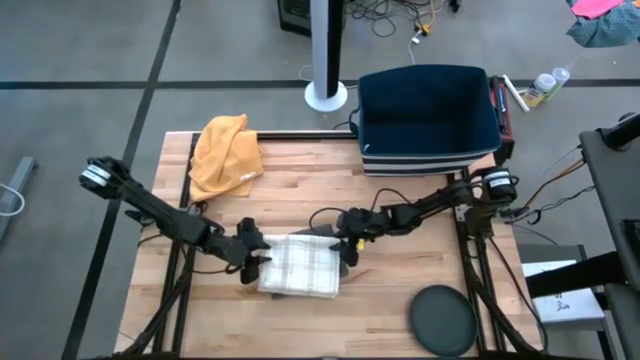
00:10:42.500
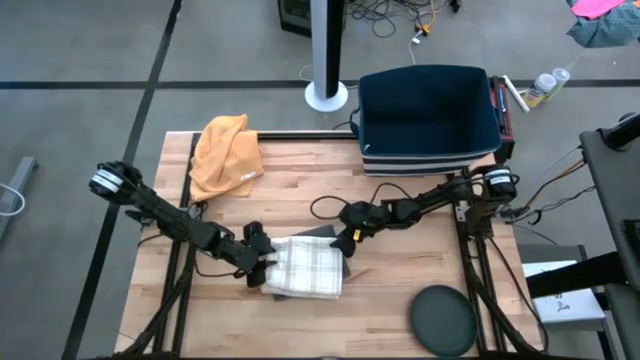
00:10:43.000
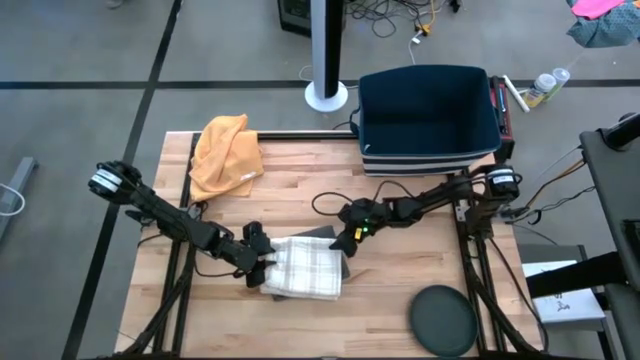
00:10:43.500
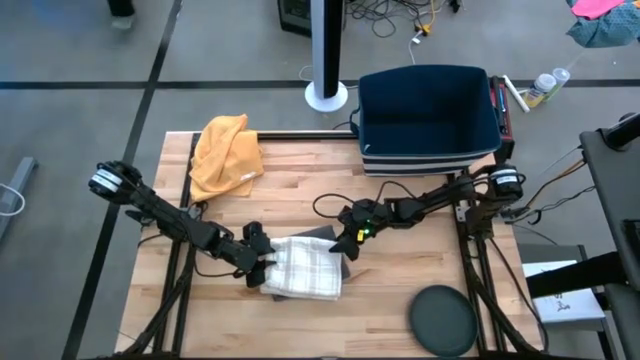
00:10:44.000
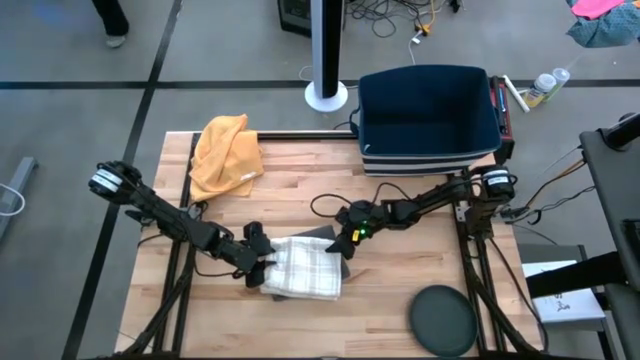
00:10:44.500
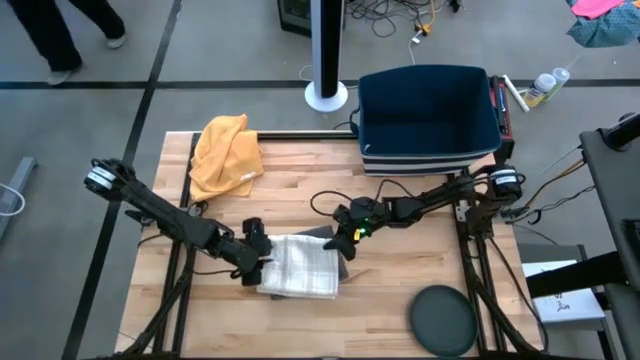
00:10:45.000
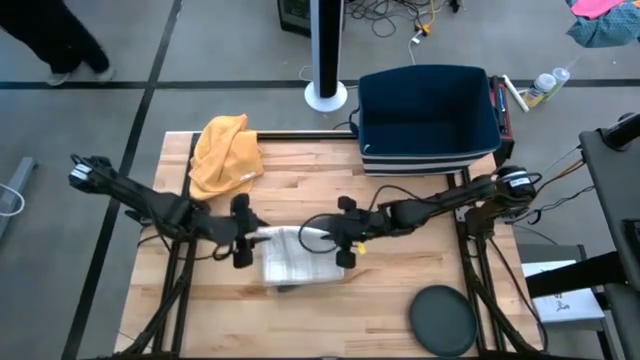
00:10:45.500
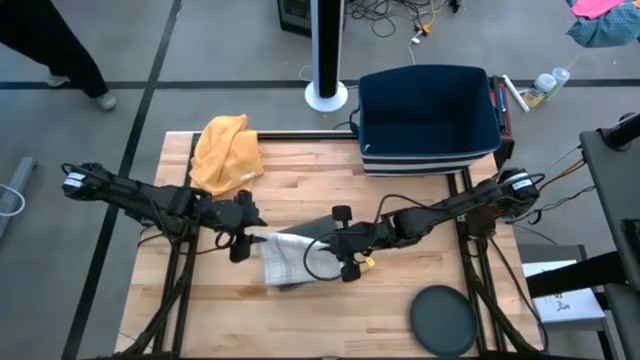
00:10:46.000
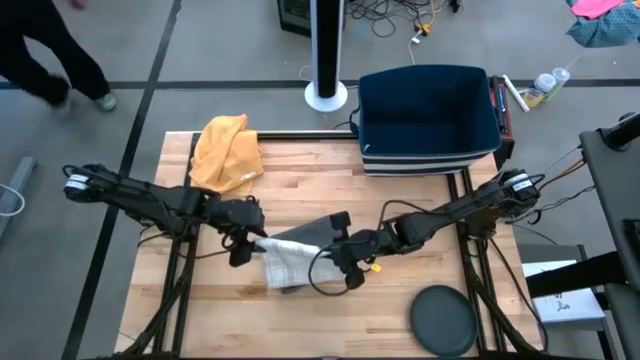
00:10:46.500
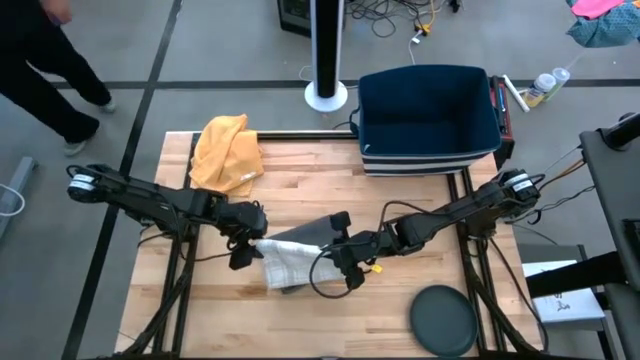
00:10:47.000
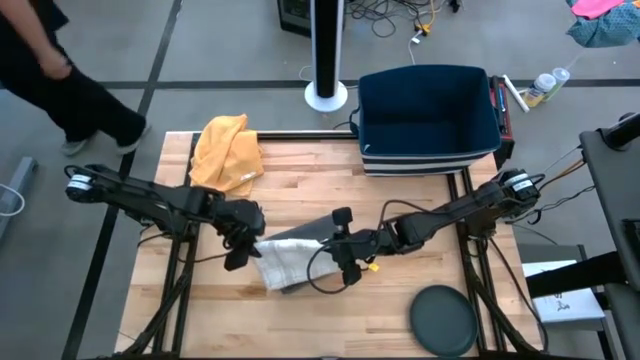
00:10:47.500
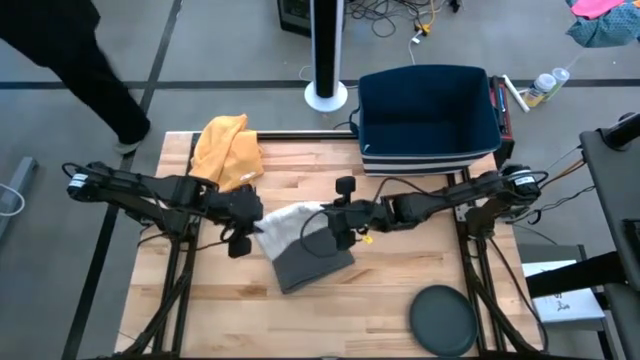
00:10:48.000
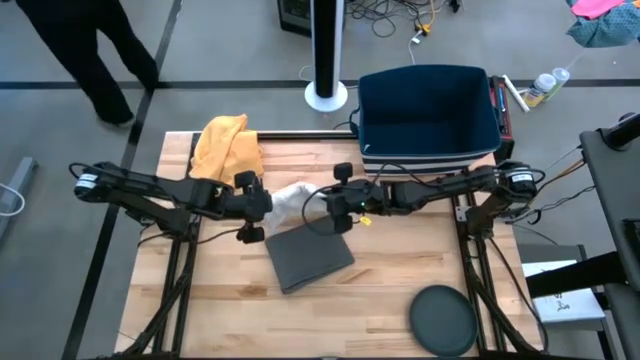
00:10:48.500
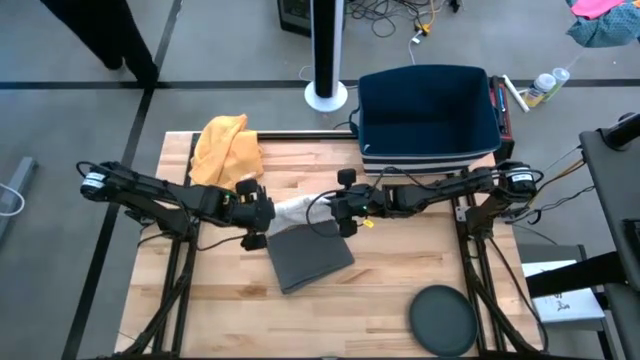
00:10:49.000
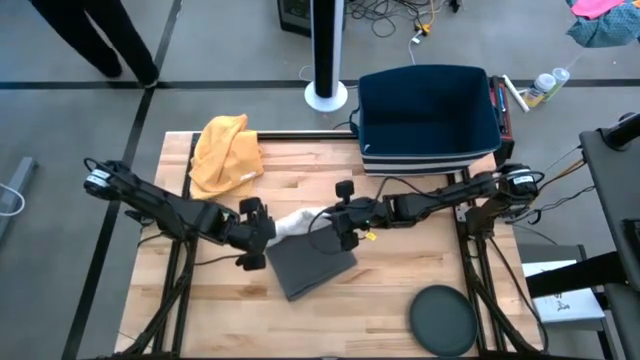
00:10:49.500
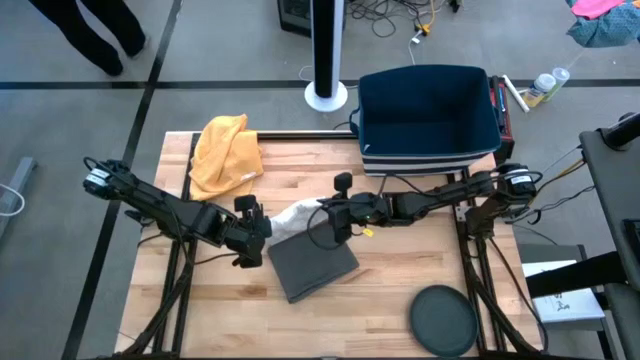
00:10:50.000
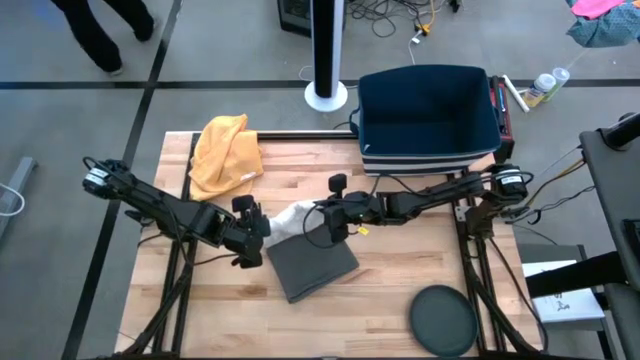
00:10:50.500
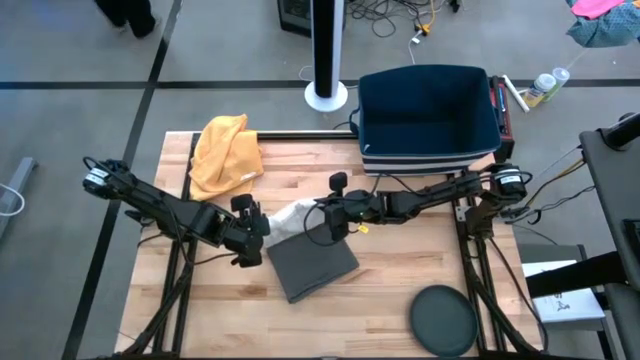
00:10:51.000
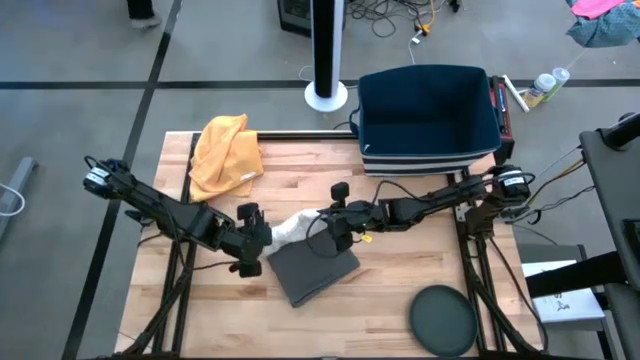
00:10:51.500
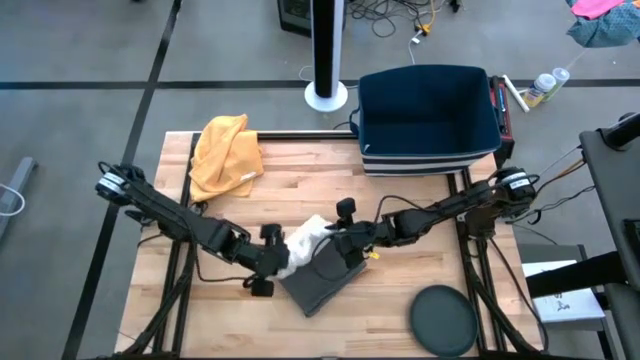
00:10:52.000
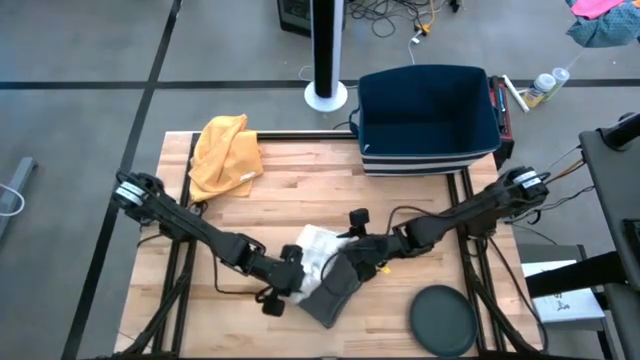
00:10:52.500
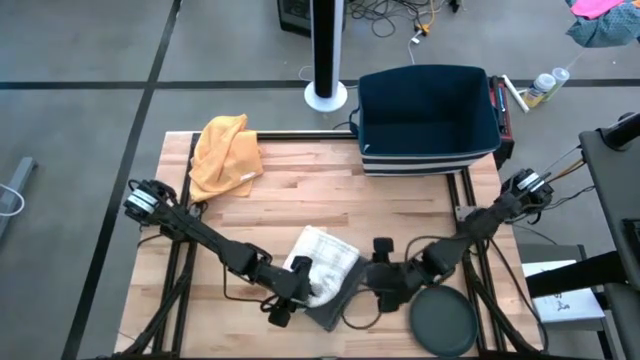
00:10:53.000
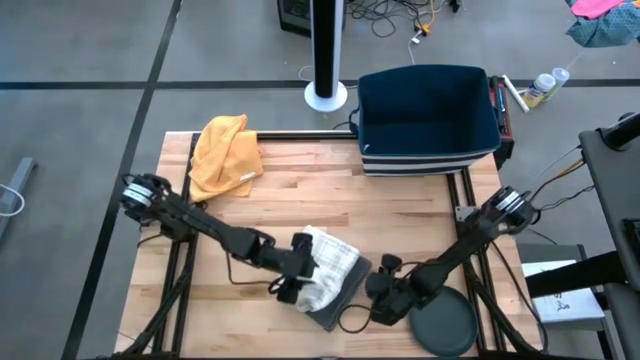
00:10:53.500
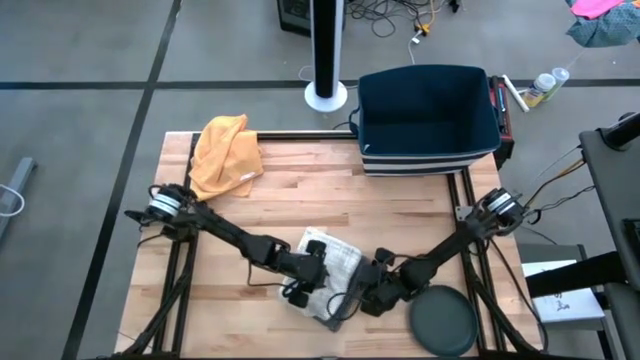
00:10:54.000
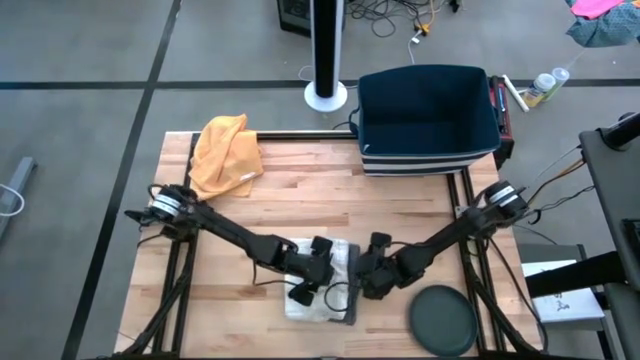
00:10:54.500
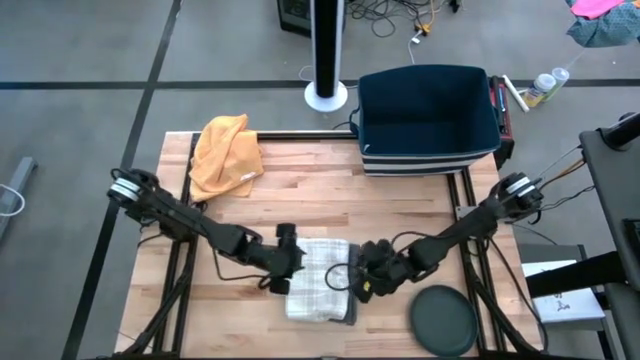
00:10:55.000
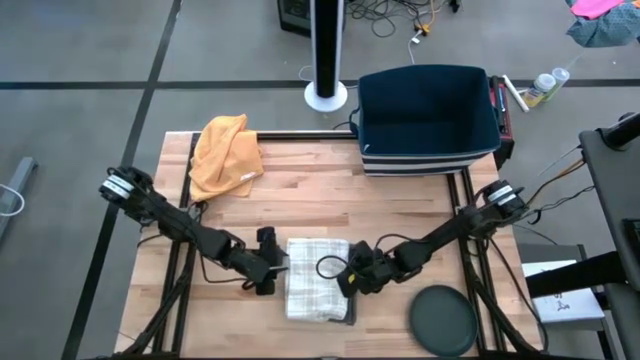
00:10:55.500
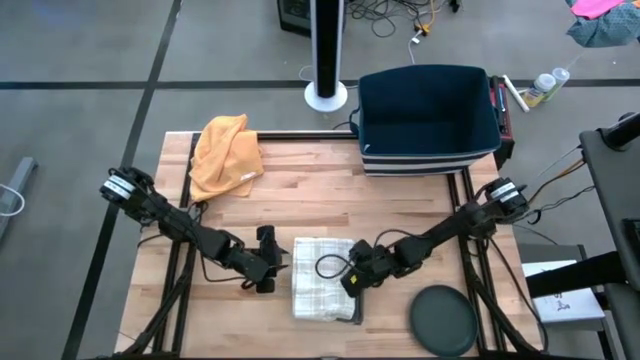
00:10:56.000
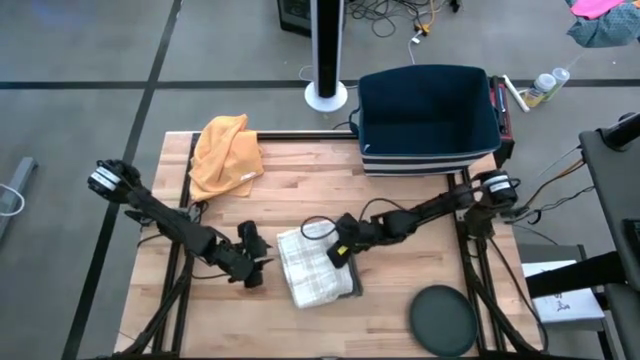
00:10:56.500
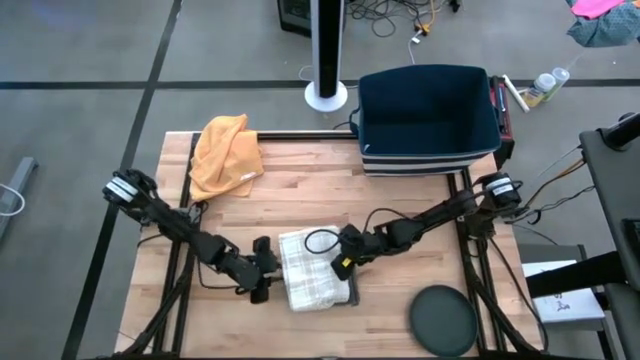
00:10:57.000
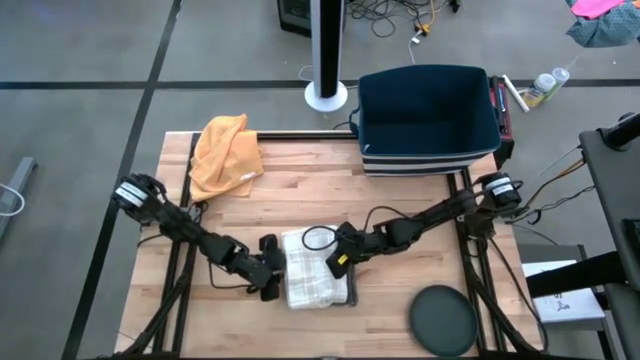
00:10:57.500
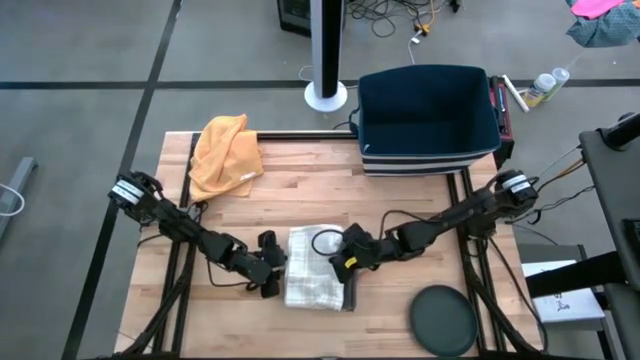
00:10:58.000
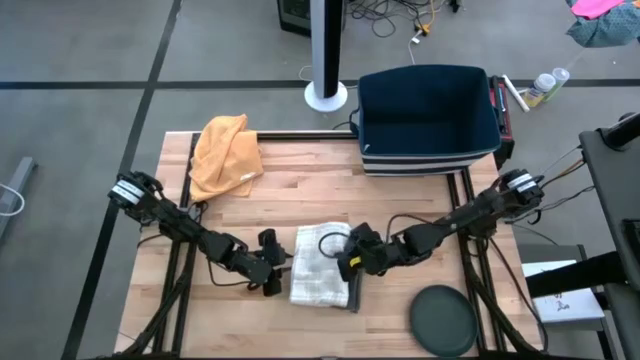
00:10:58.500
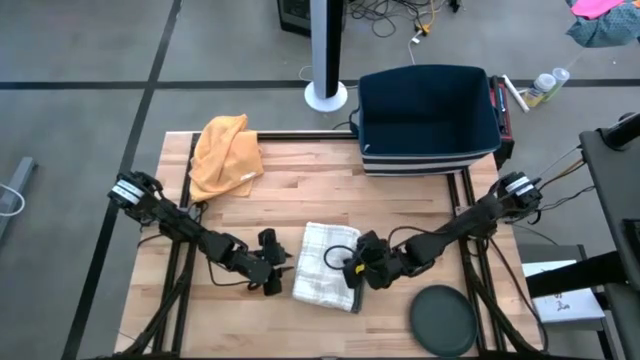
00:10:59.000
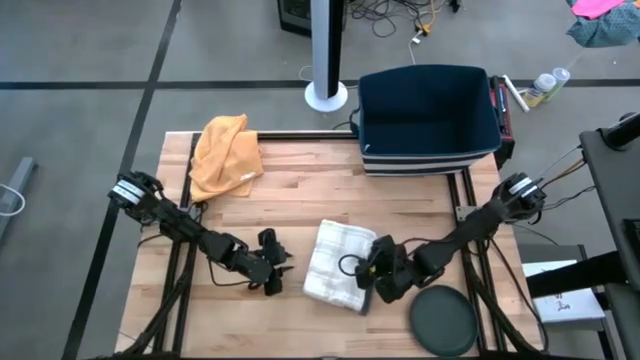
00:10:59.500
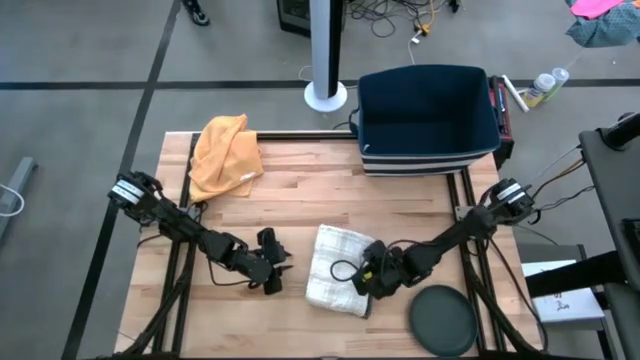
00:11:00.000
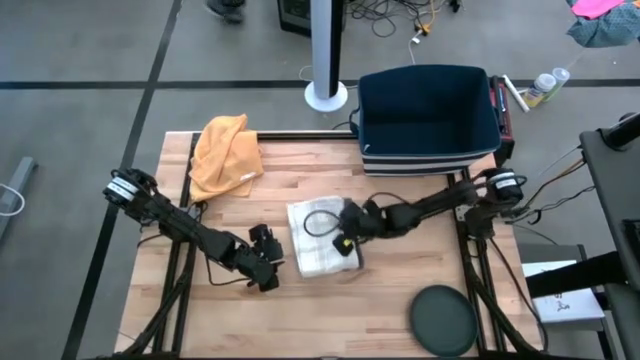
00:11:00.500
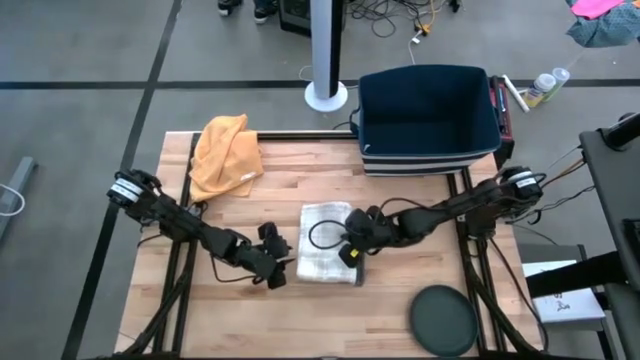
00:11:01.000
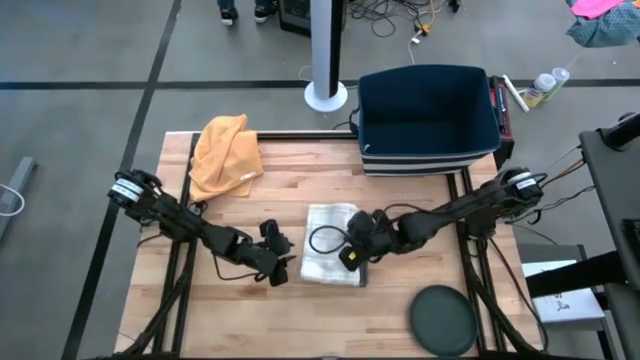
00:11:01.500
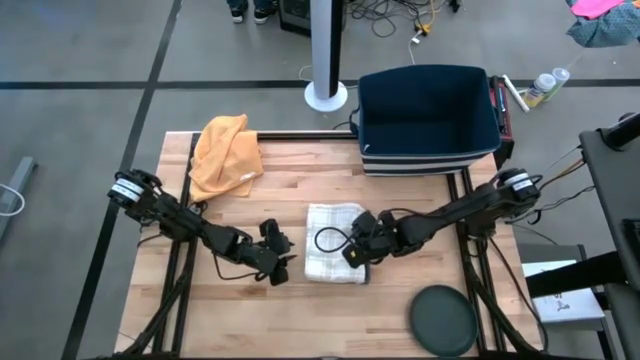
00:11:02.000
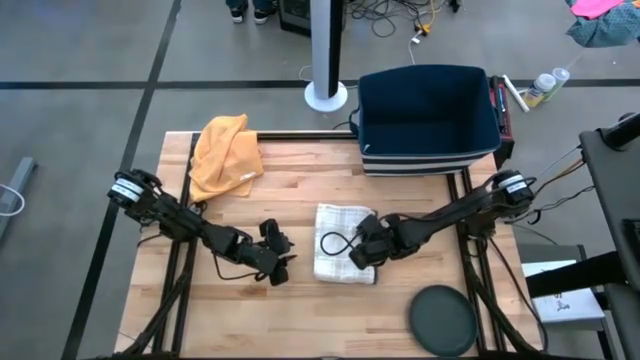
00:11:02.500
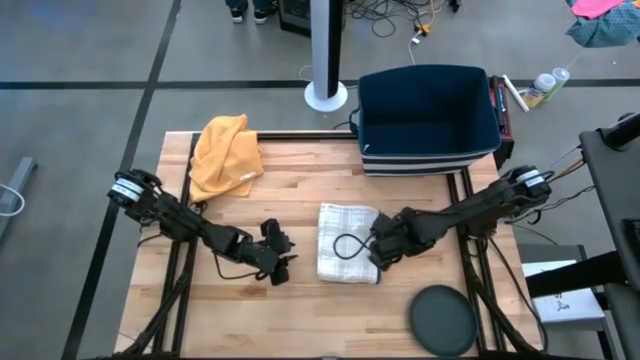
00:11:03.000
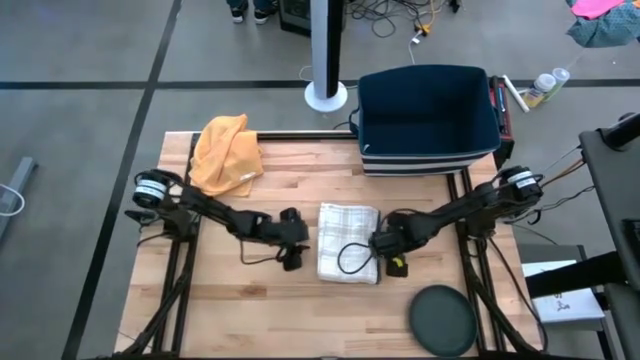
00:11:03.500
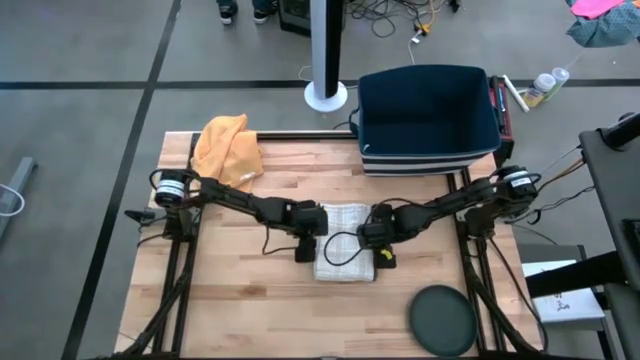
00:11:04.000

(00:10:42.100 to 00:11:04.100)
Task: Fold kitchen towel into neat rectangle
Stack the white patterned towel on top of the gray towel
